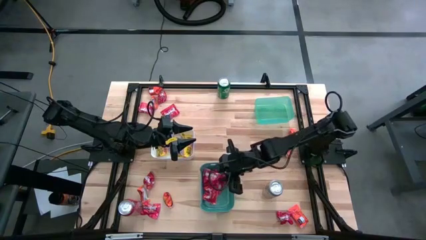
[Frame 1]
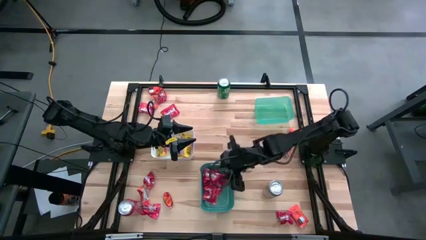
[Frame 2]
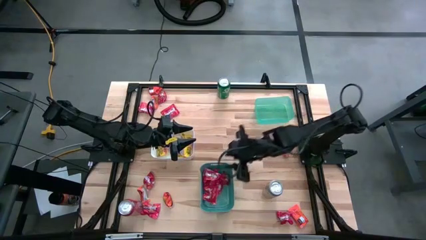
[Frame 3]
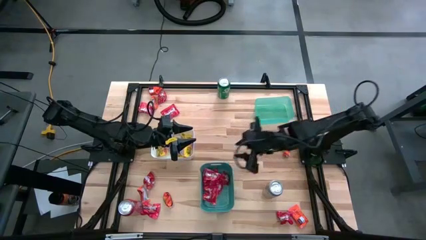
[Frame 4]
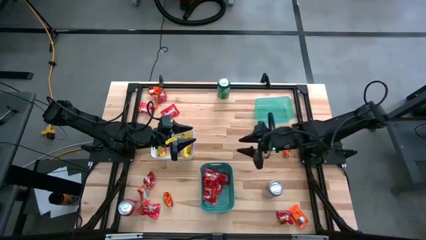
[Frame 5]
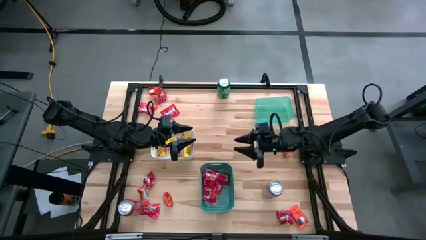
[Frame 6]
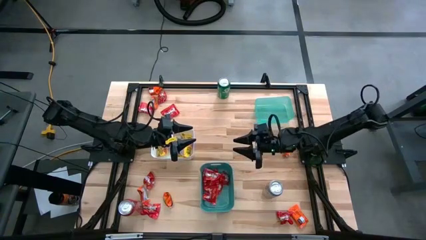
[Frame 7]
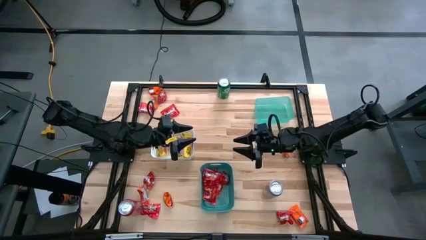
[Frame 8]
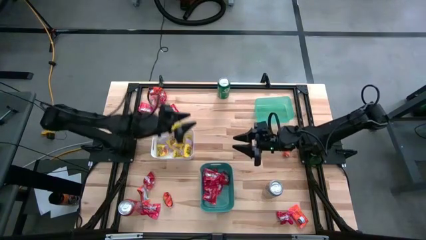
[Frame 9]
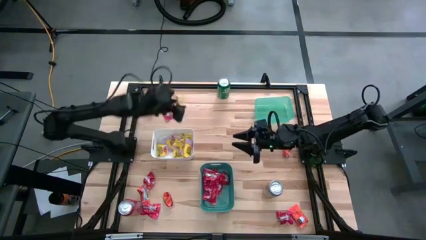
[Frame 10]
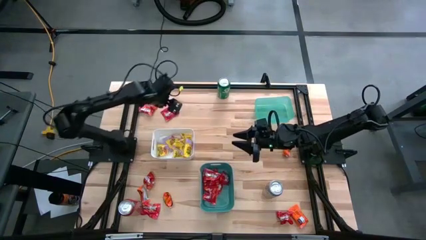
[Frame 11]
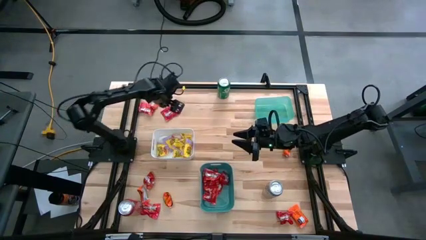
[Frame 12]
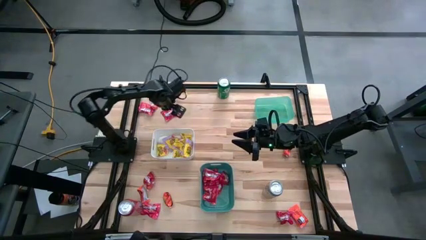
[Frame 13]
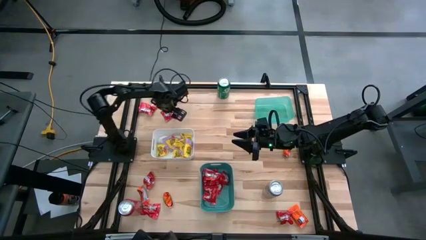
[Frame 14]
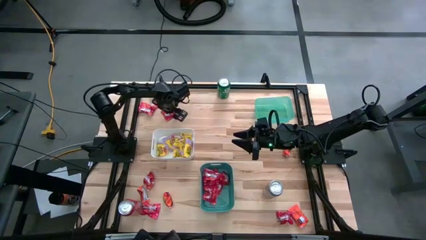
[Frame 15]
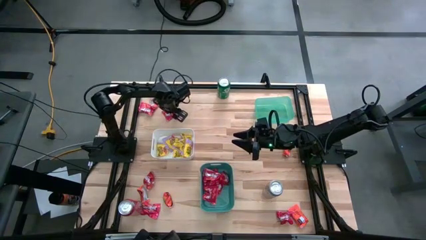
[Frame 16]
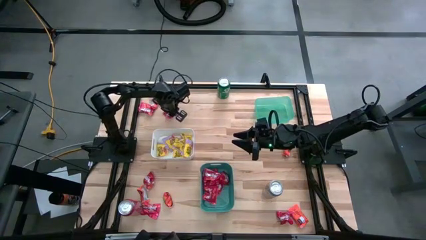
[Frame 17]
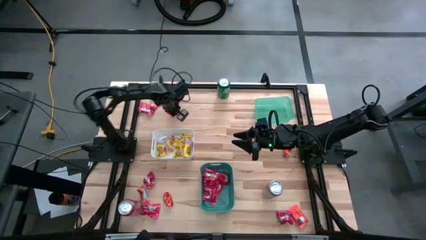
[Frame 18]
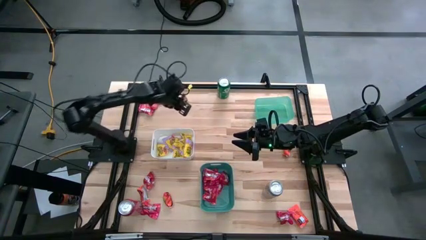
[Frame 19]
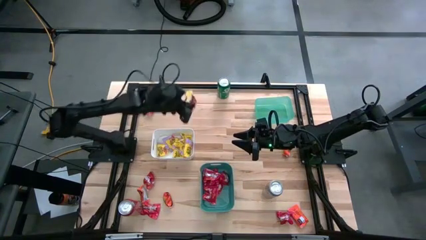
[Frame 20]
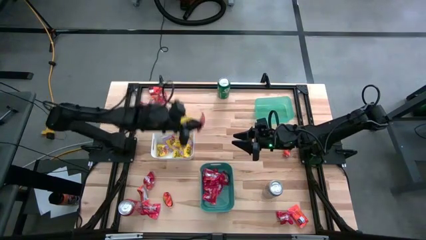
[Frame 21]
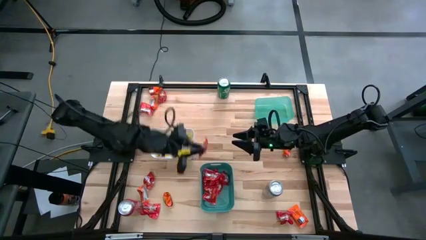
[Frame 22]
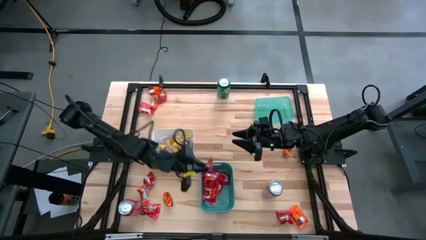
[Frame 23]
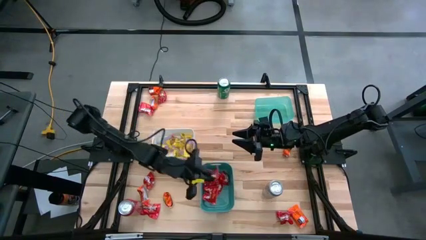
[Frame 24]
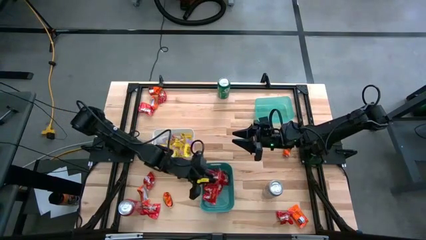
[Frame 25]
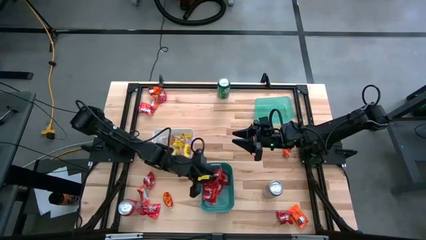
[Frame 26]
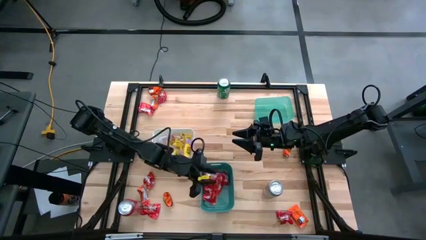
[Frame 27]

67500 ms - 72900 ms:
Task: Sort candy
Put the red candy pack into the green bin

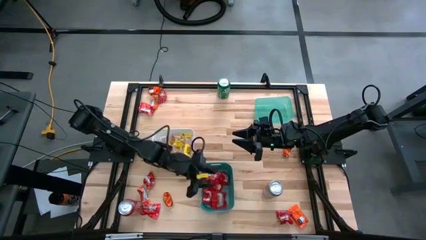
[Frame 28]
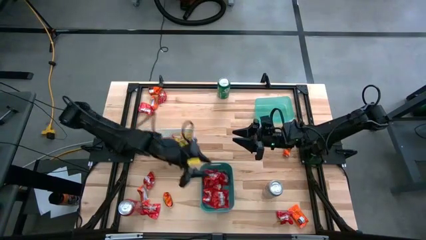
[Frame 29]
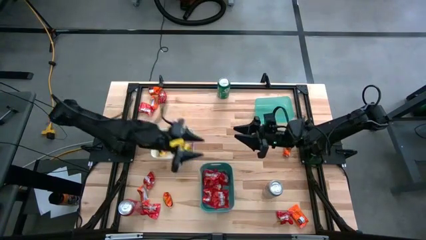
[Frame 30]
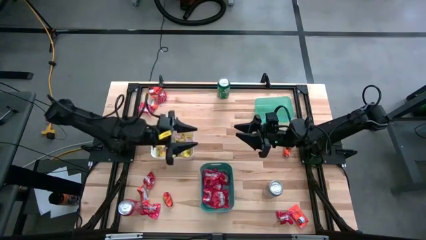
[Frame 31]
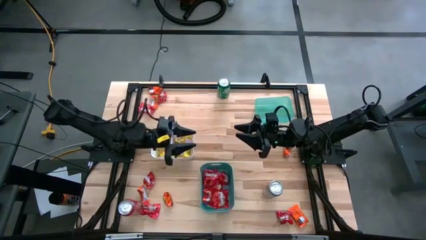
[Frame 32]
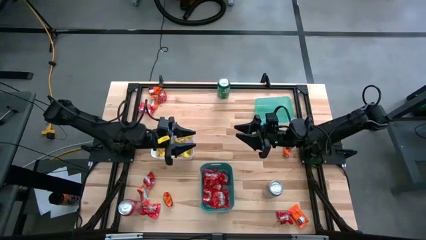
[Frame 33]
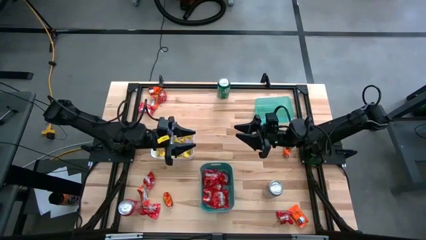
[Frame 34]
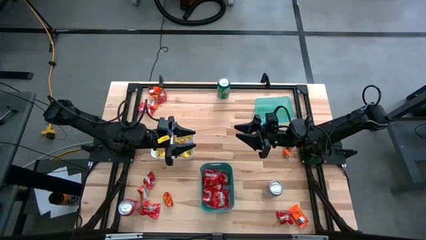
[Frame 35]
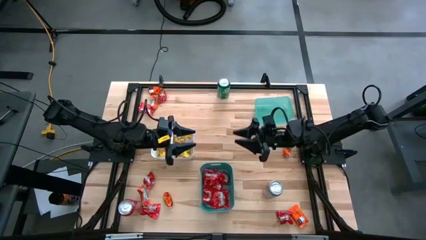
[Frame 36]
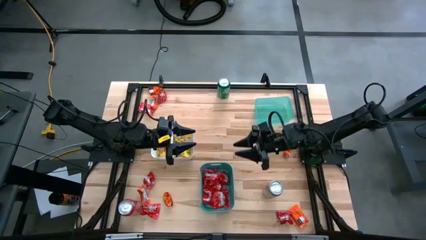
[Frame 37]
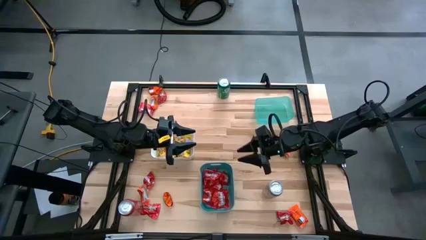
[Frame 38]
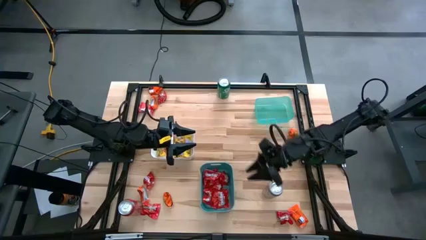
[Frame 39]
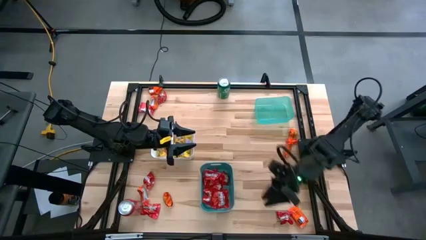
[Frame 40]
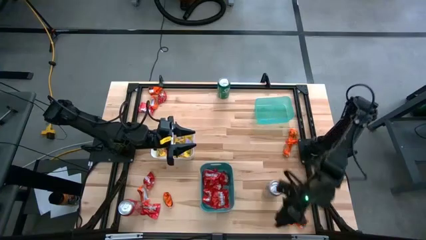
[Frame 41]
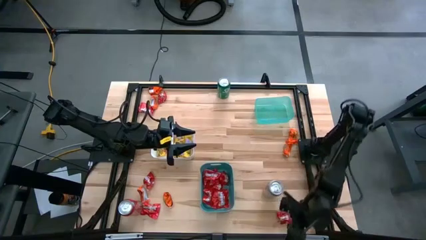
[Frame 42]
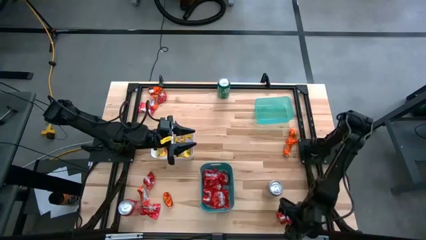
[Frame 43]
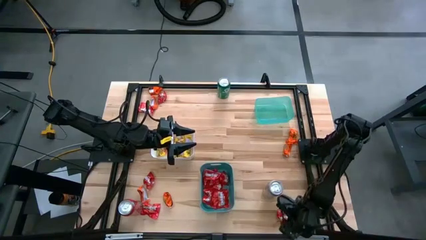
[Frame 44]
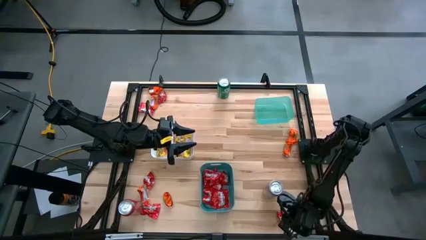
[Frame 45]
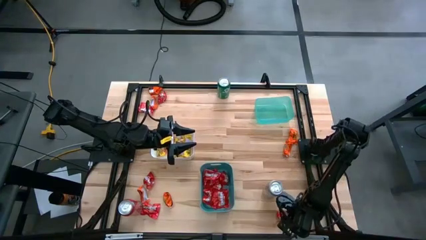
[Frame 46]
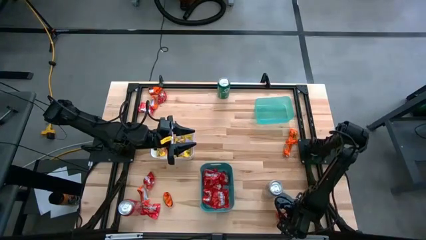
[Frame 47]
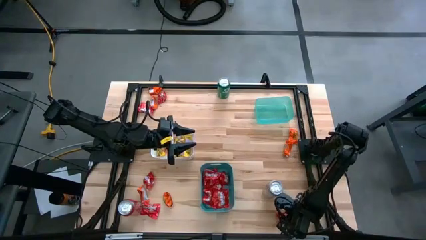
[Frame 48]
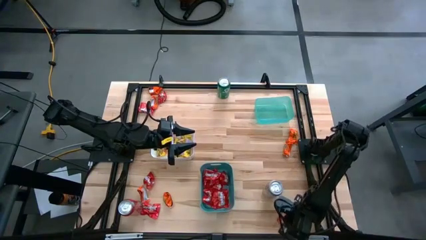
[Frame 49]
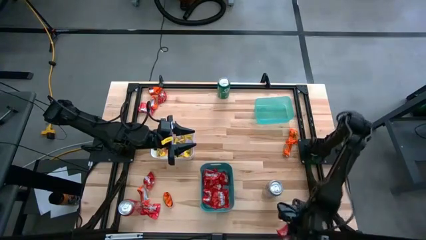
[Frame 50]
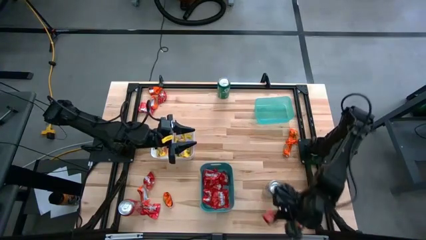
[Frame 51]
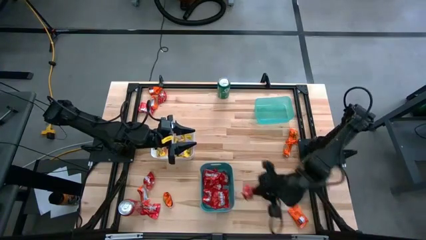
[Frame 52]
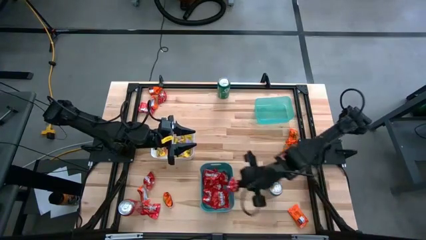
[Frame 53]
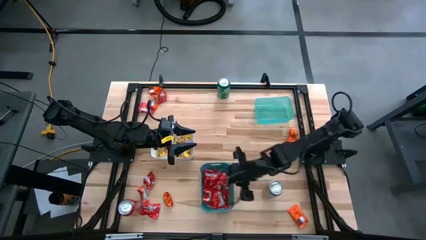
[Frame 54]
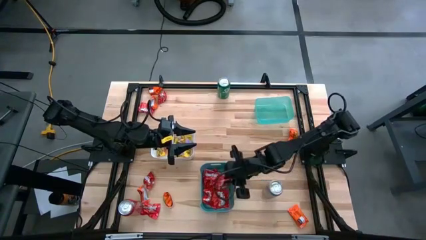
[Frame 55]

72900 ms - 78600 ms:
Put the red candy pack into the green bin

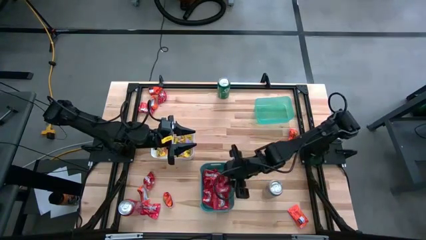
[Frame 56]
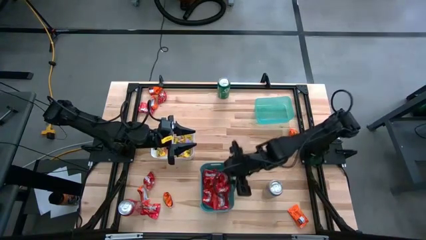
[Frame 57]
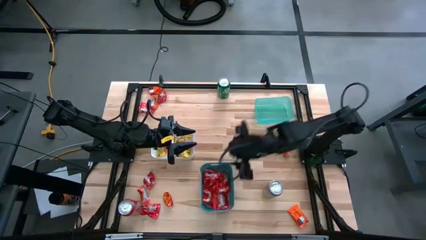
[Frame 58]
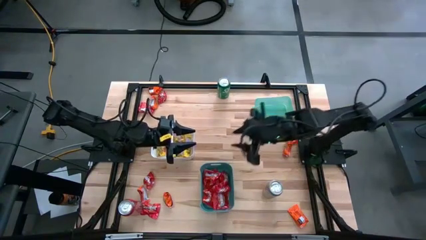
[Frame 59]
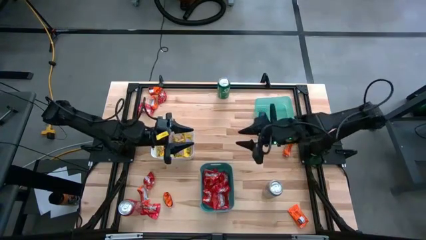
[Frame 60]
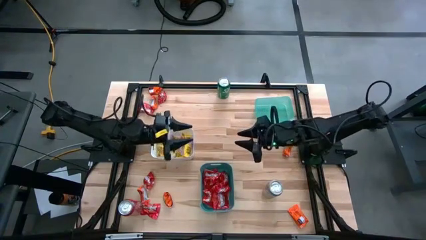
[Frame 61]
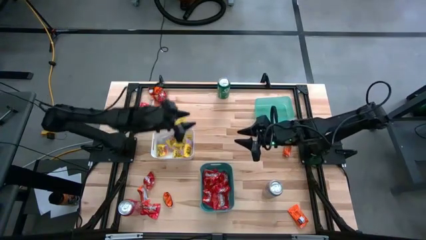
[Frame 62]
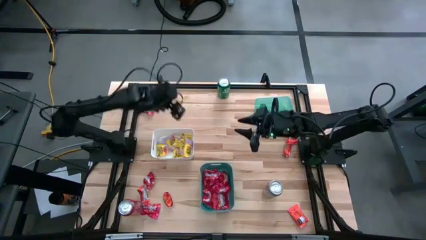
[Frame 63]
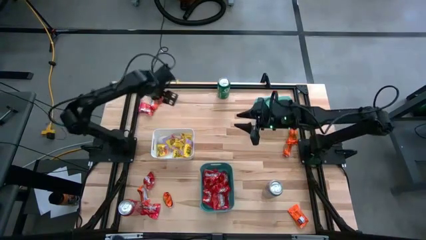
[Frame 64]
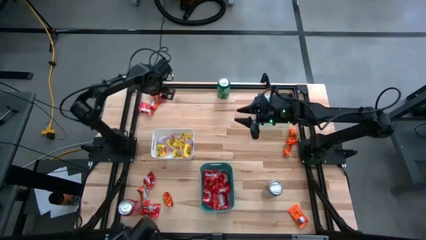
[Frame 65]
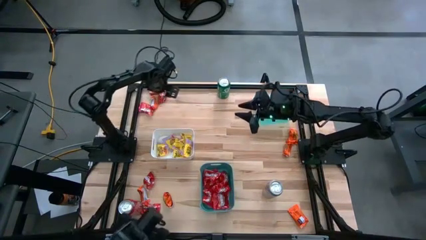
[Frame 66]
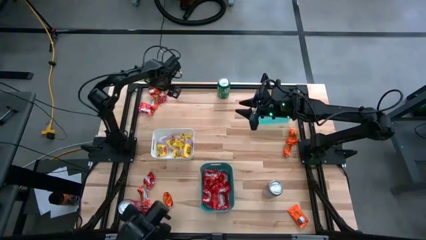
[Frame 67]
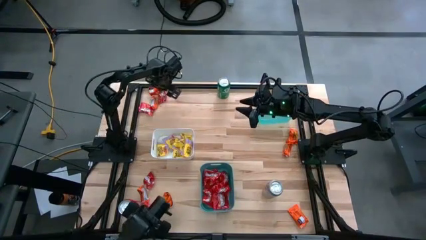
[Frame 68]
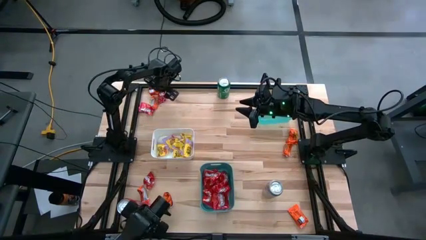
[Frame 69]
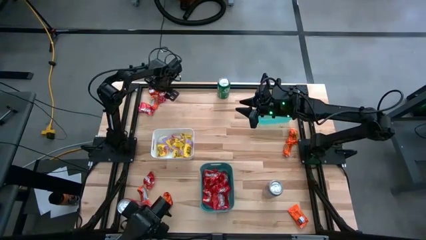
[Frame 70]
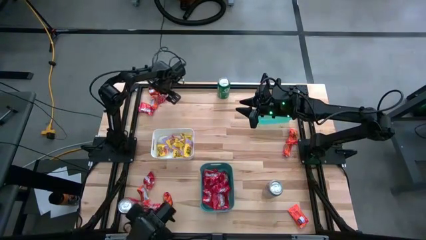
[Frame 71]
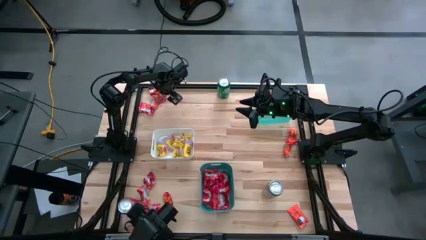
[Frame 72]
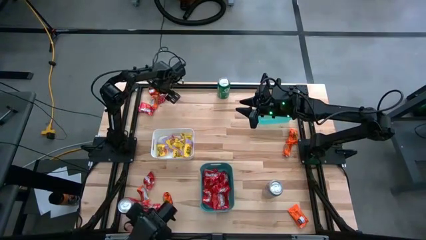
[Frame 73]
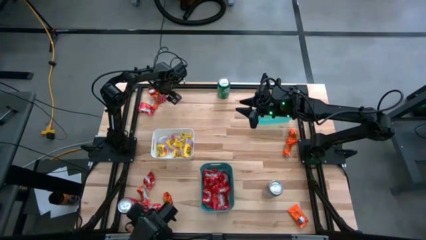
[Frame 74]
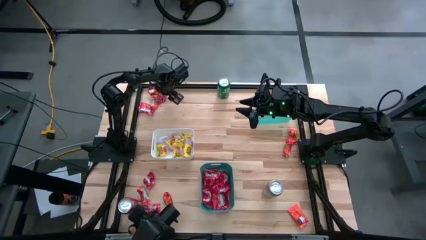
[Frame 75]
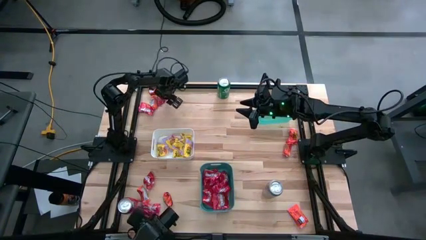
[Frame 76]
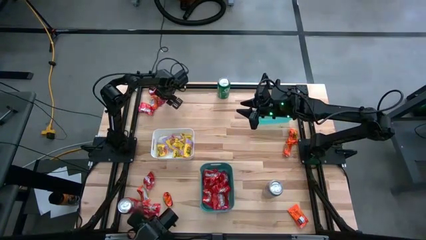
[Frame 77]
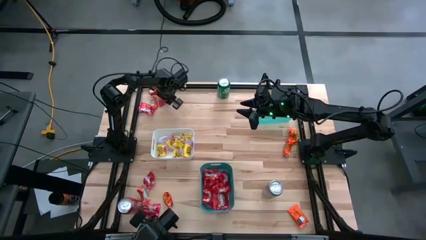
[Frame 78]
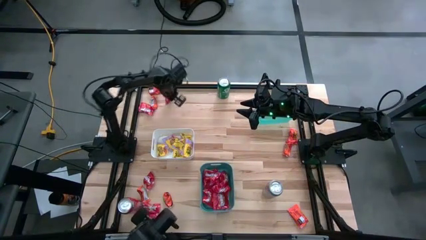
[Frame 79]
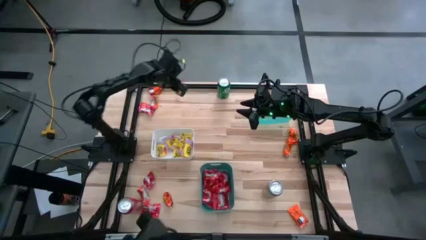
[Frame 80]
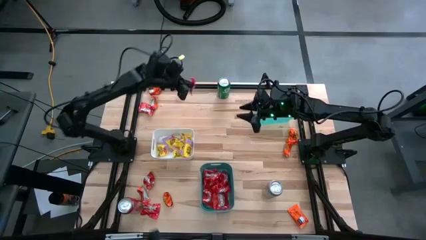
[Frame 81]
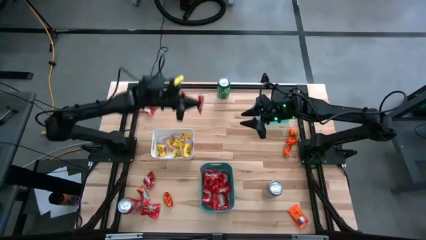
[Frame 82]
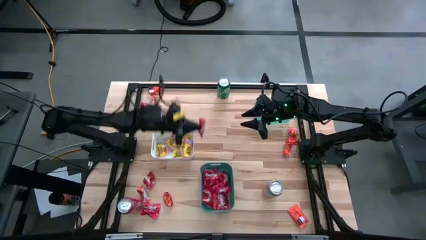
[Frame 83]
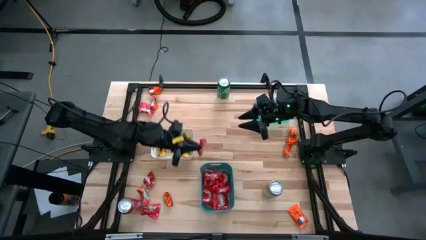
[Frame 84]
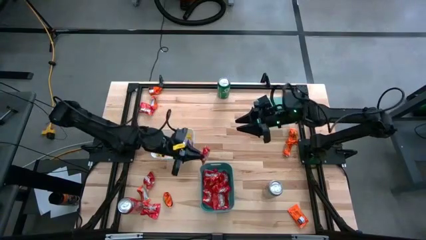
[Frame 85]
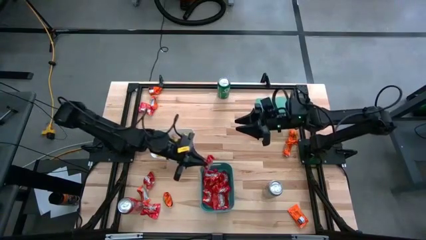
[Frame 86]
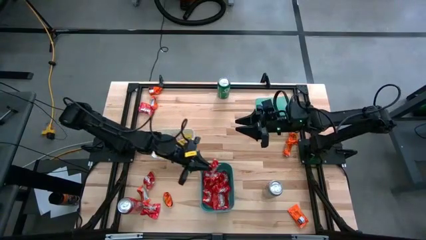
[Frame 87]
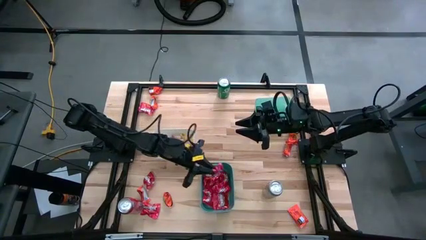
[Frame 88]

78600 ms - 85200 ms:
Put the red candy pack into the green bin
